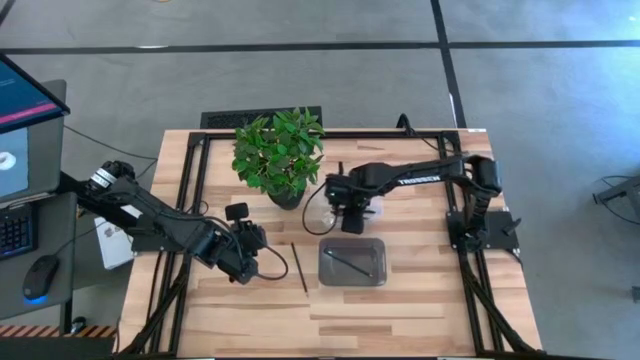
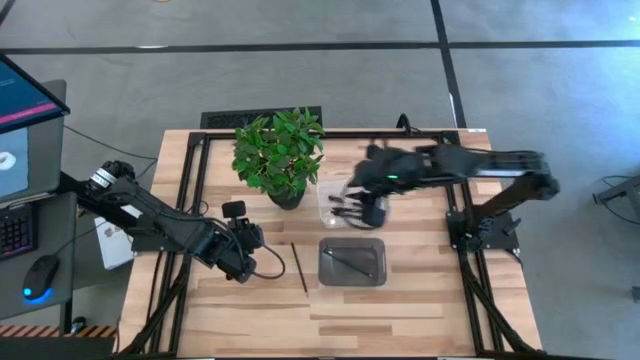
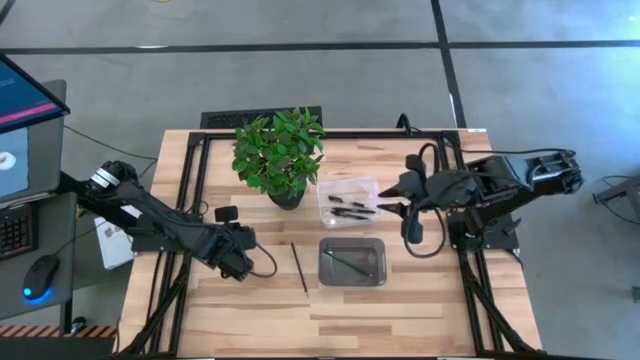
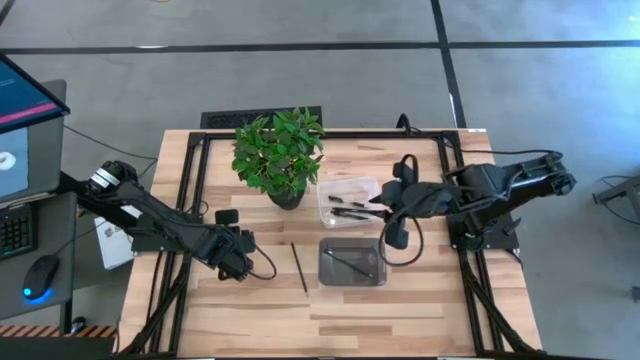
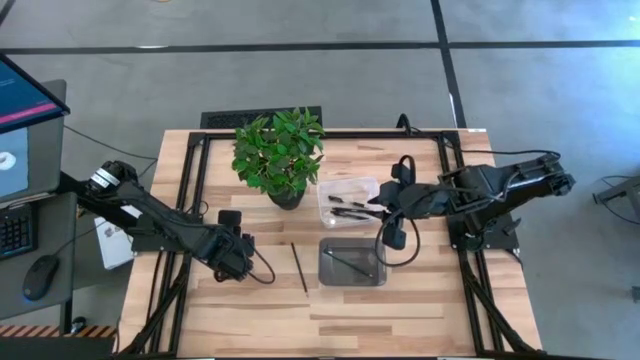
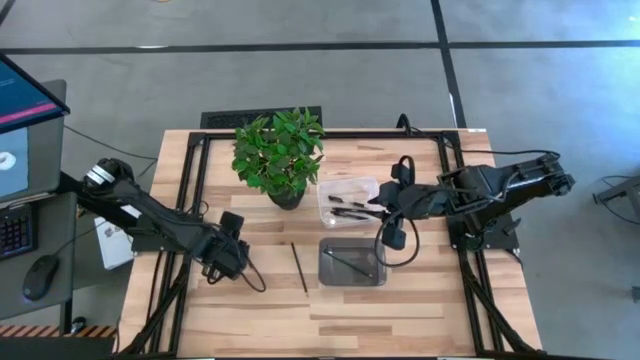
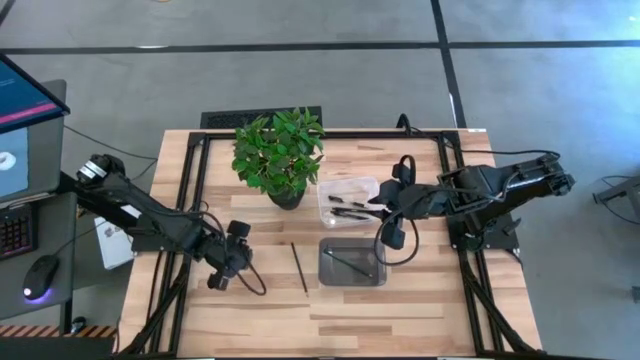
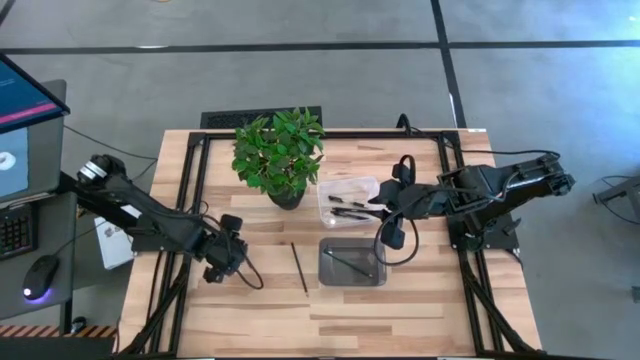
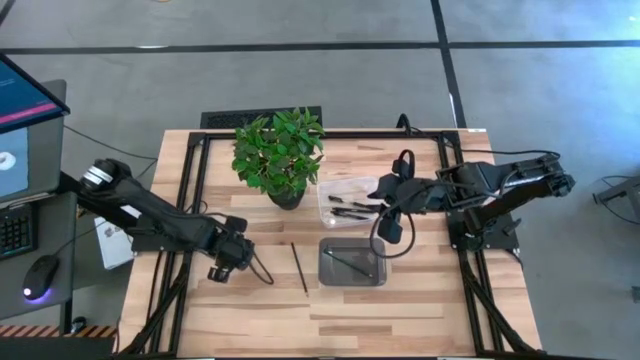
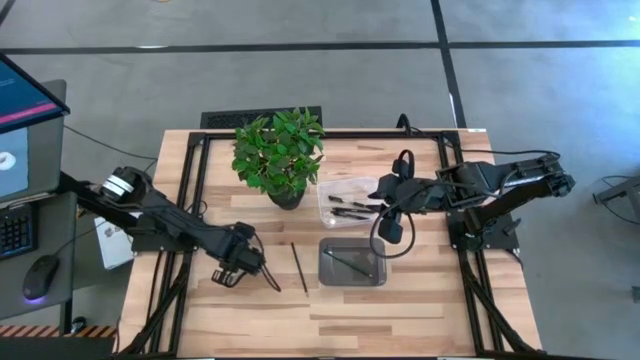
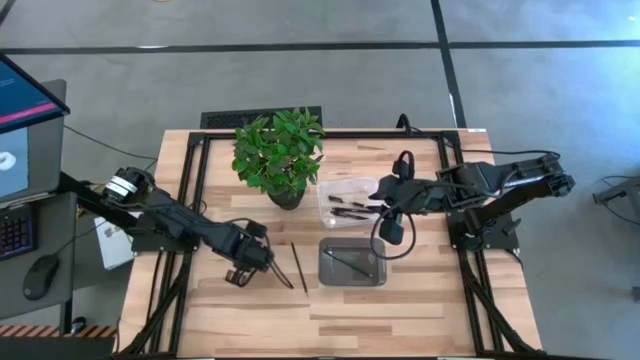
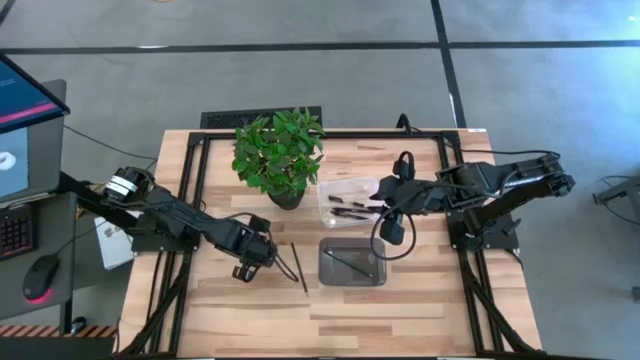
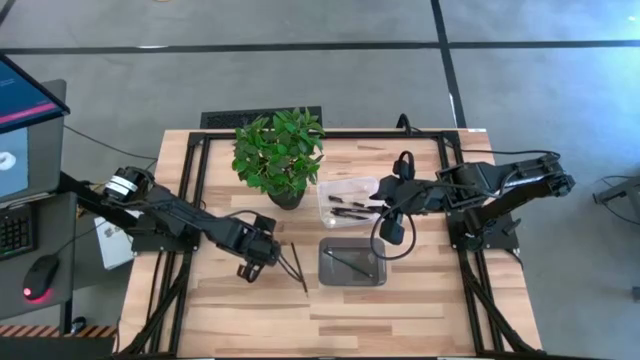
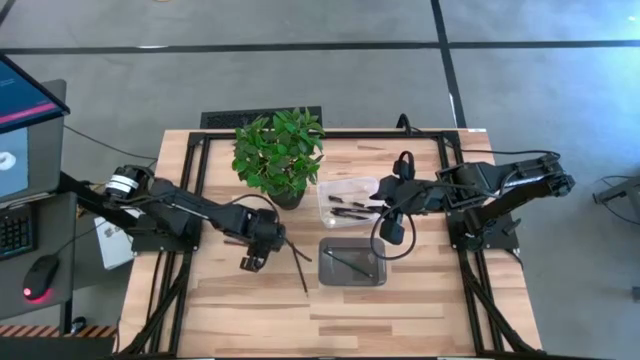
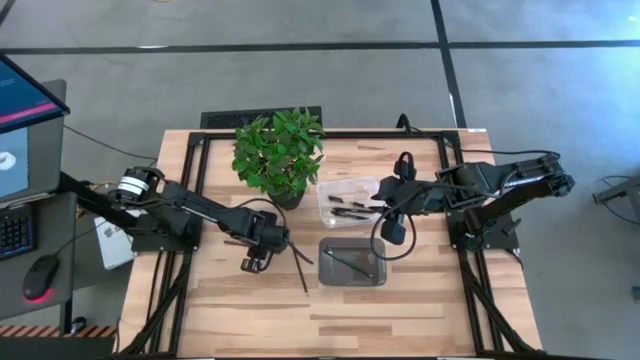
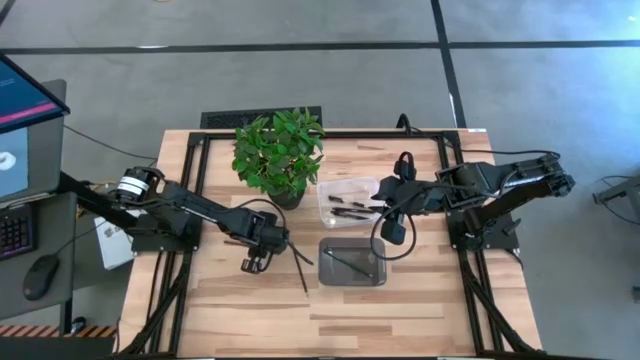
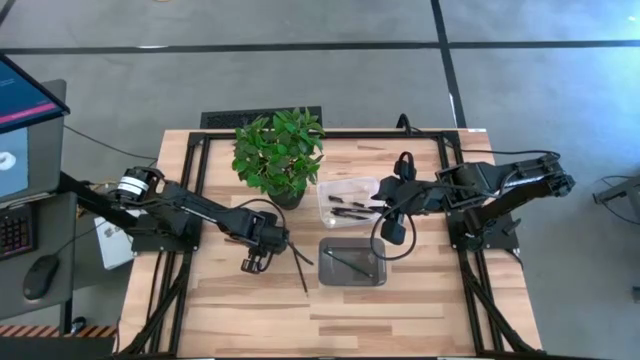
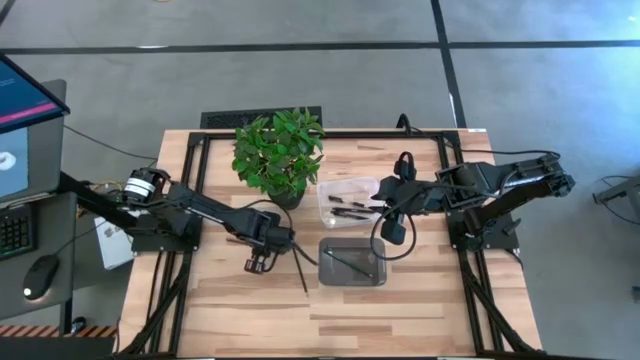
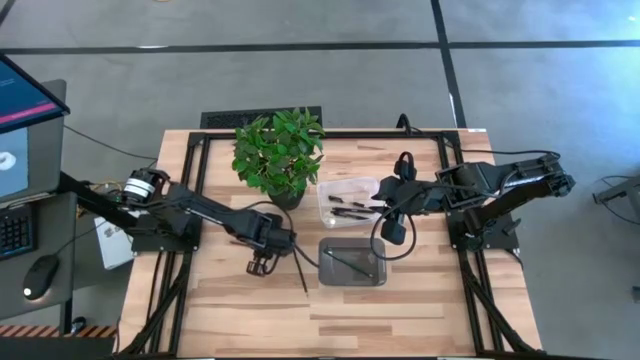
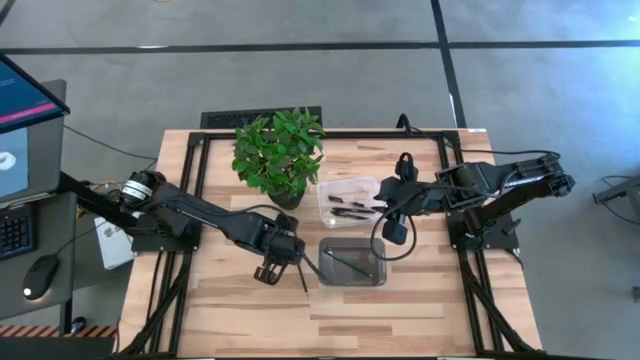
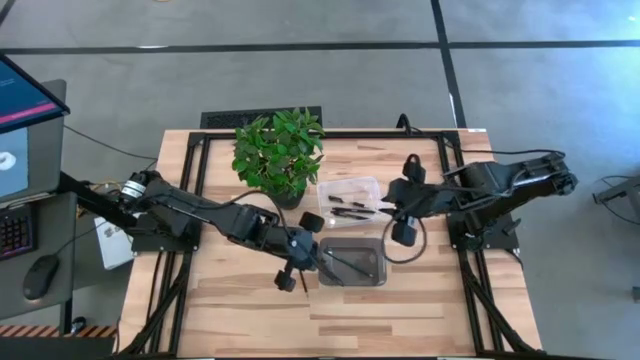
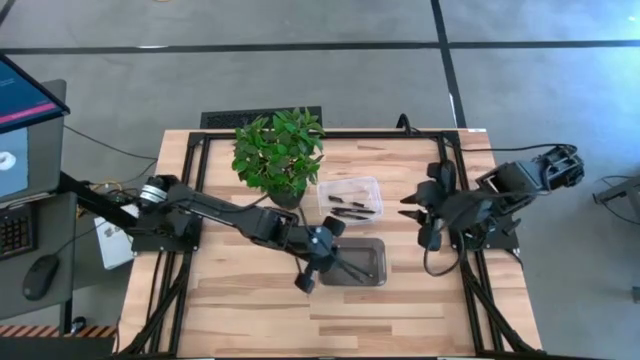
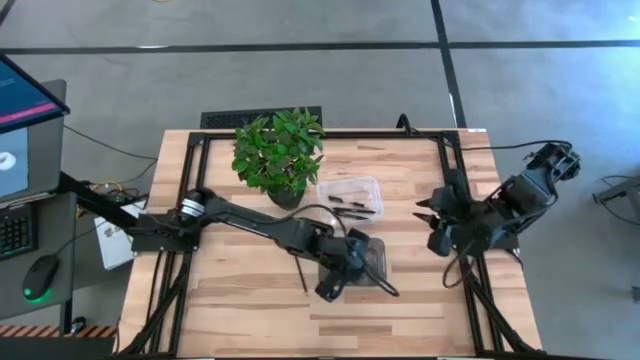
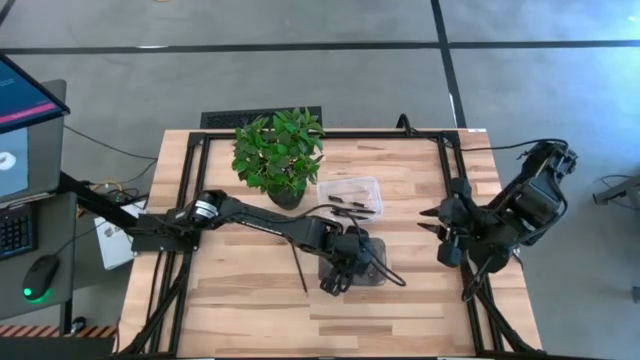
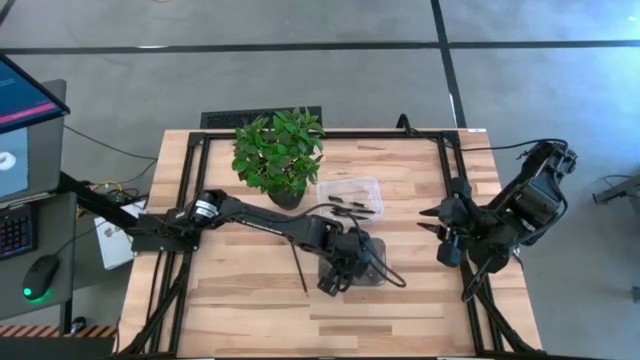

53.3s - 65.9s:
Task: Sort pens & pencils
Put the brown pencil into the black bin

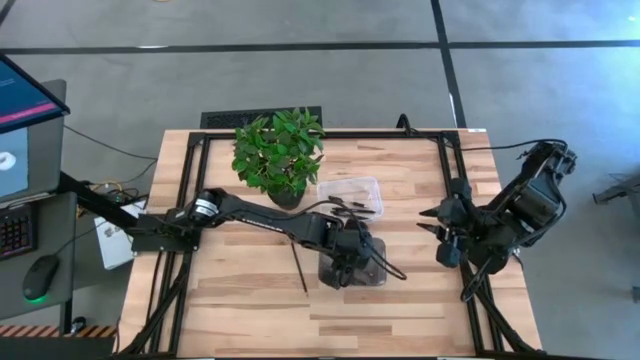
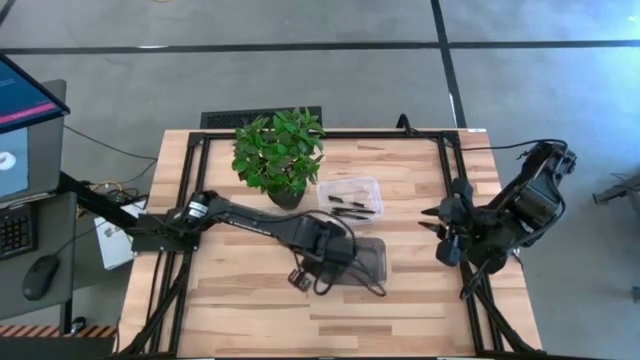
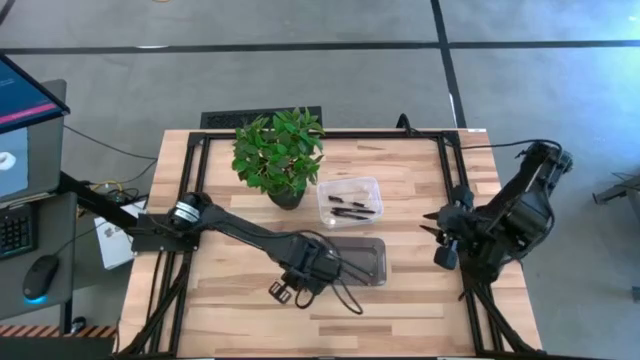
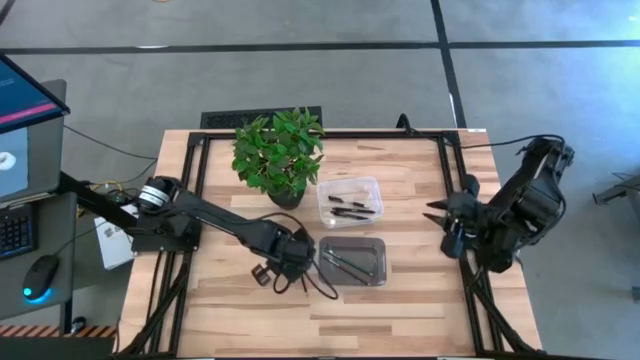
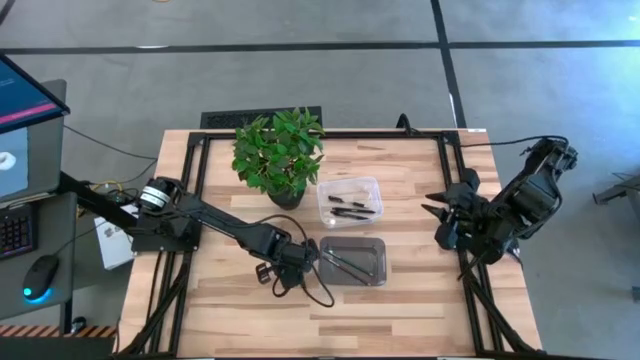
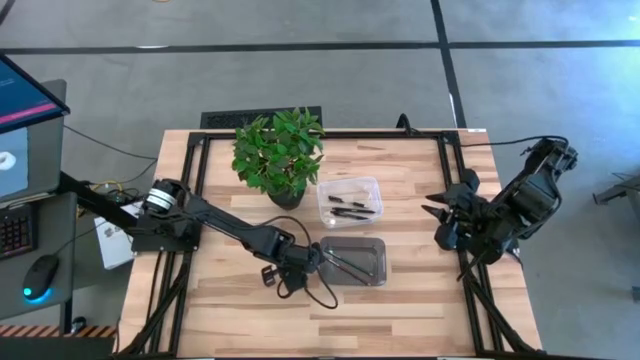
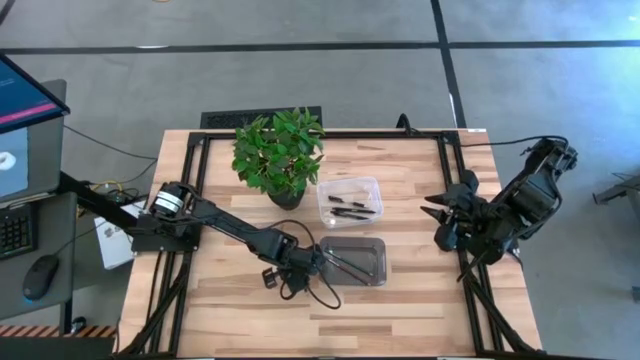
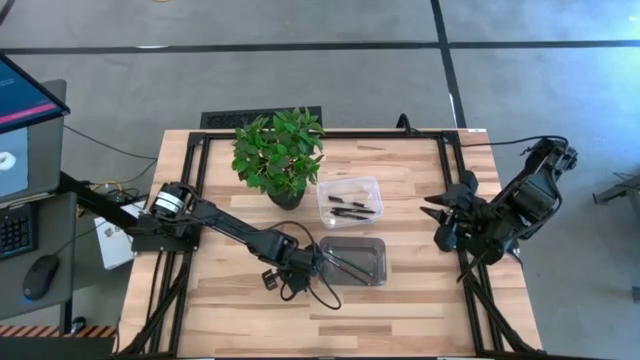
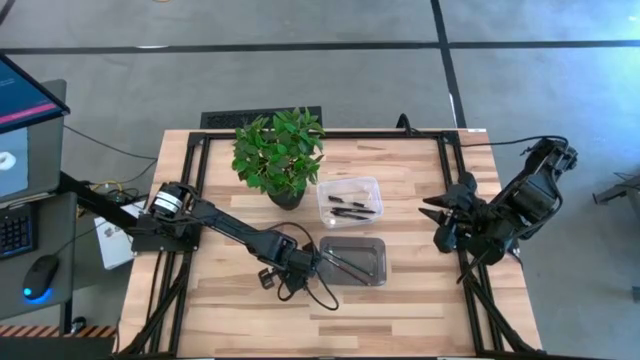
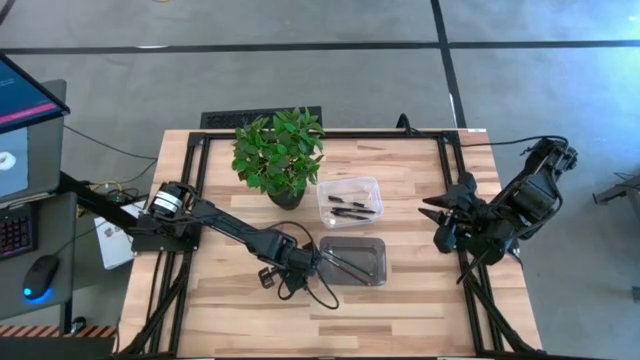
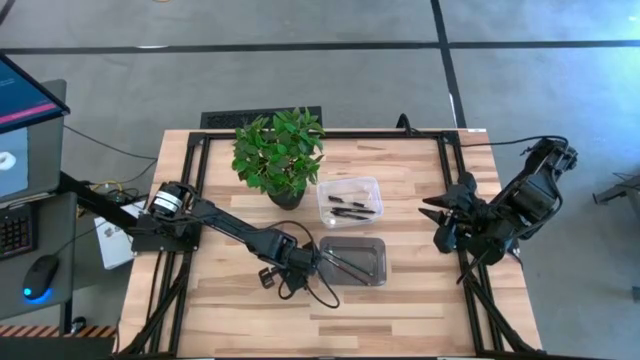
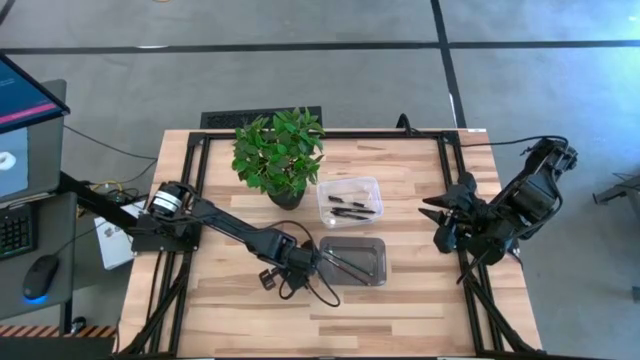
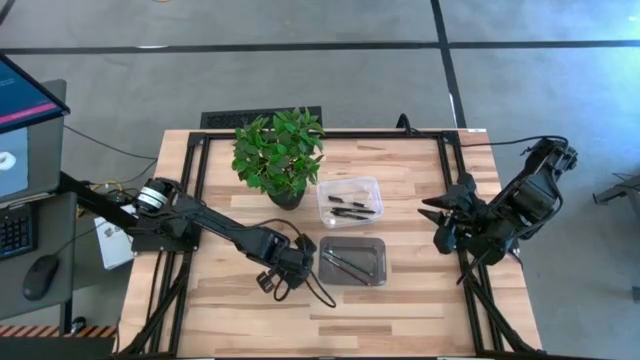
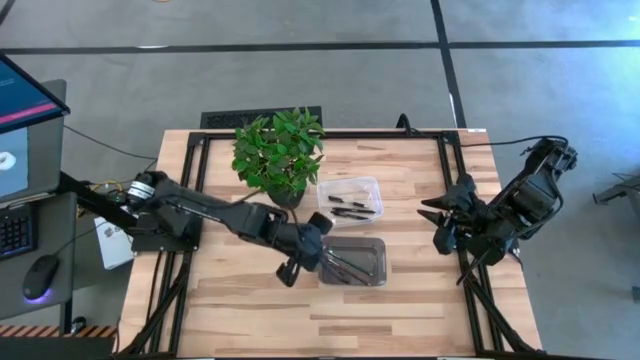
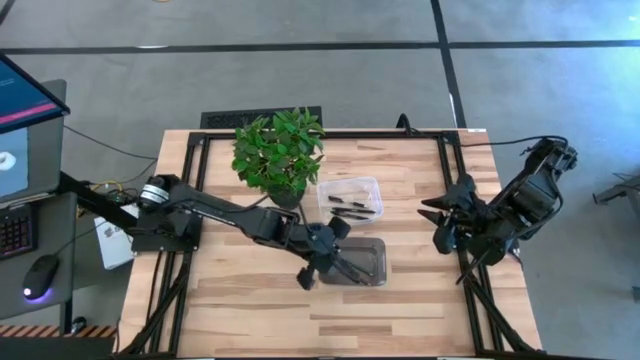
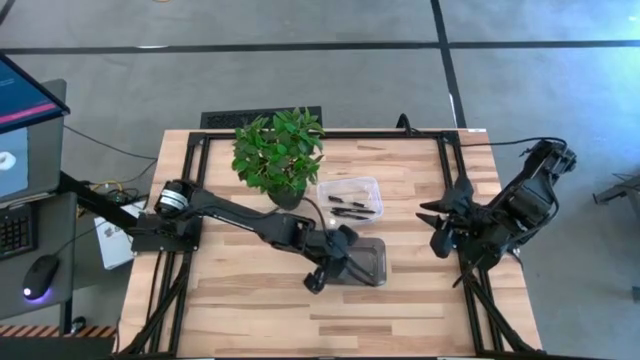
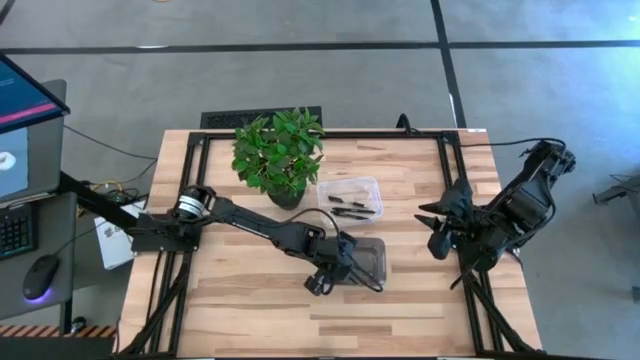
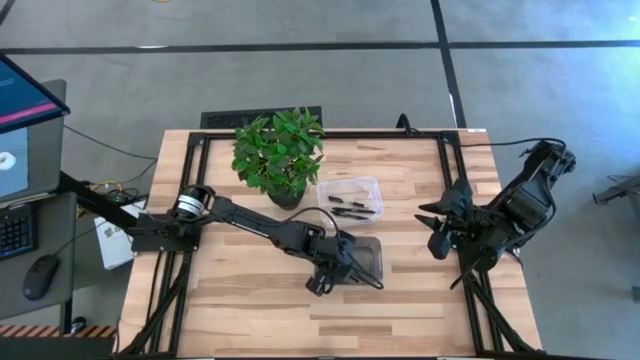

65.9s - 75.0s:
Put the black pencil into the black bin
